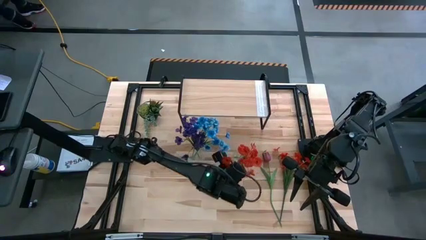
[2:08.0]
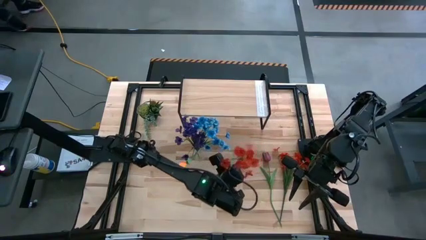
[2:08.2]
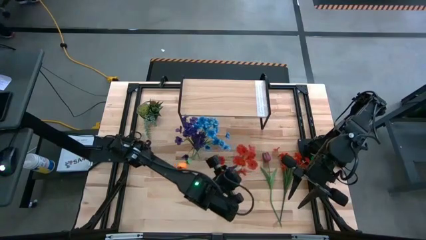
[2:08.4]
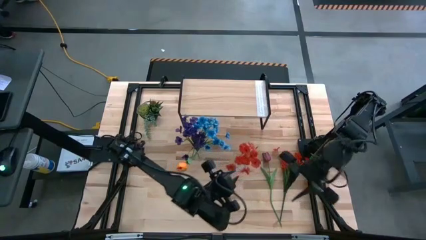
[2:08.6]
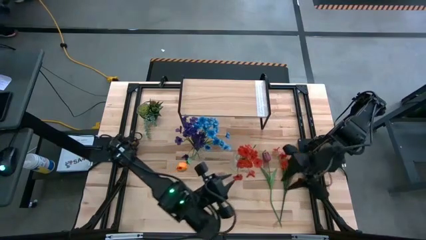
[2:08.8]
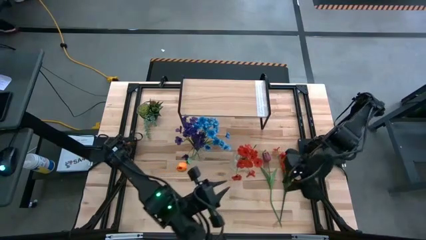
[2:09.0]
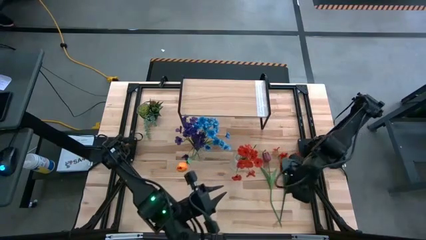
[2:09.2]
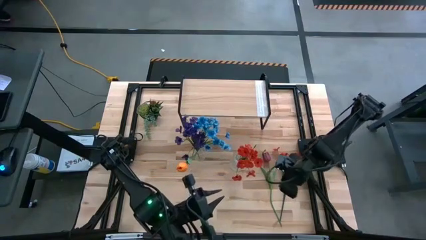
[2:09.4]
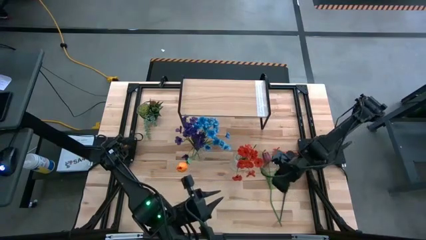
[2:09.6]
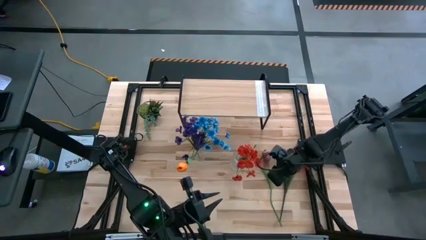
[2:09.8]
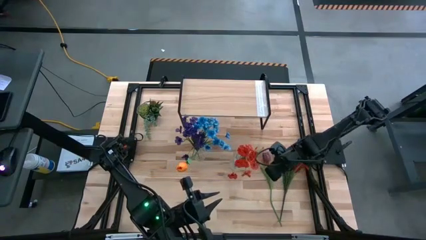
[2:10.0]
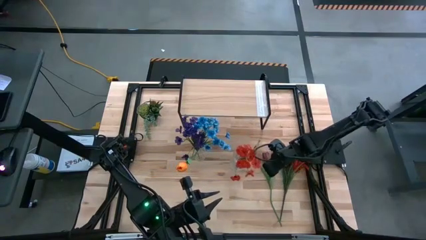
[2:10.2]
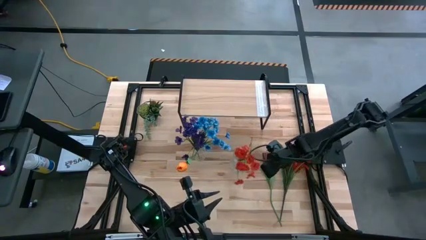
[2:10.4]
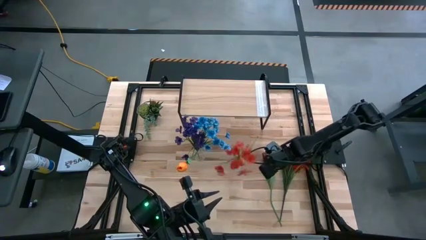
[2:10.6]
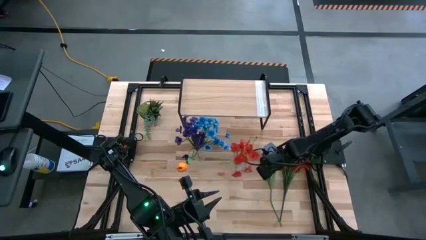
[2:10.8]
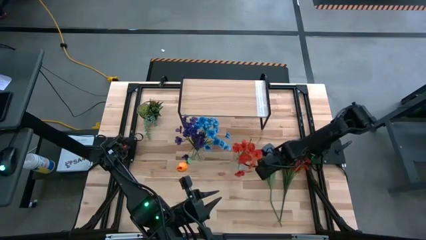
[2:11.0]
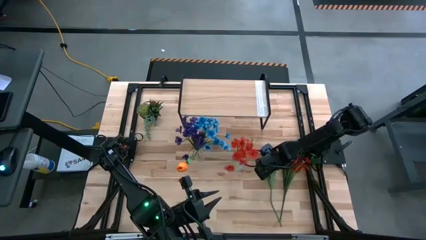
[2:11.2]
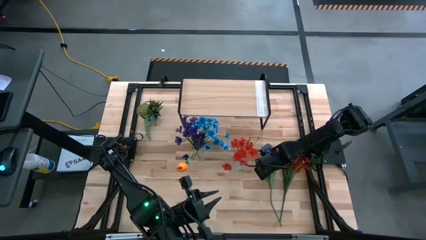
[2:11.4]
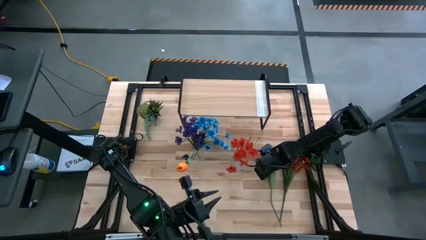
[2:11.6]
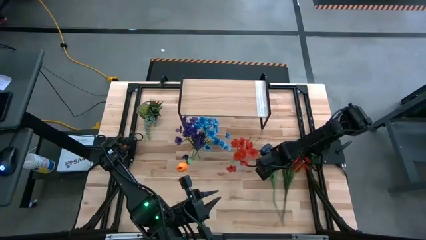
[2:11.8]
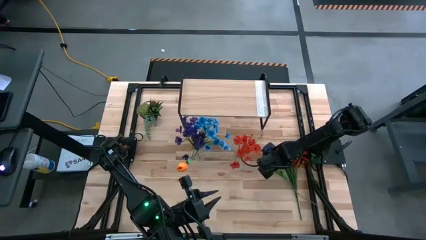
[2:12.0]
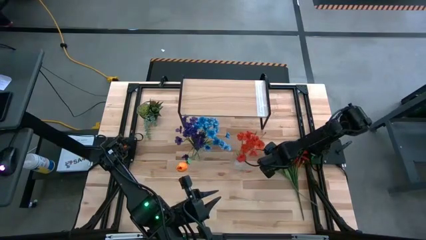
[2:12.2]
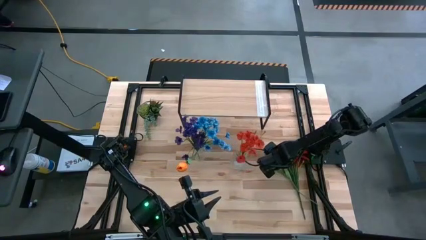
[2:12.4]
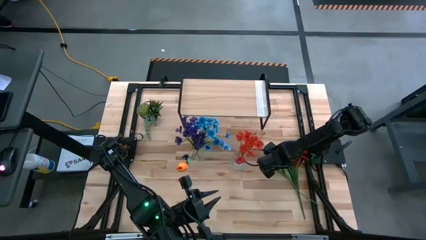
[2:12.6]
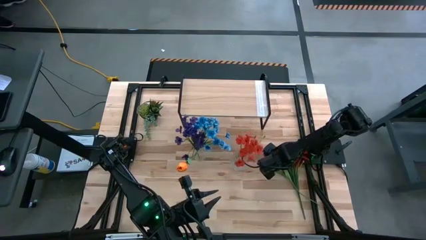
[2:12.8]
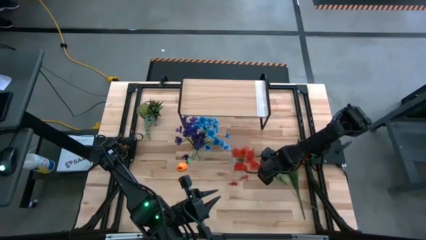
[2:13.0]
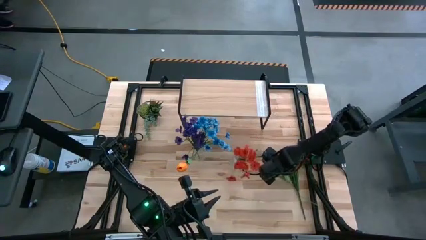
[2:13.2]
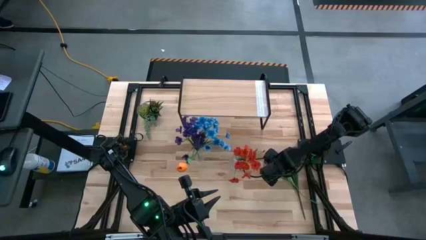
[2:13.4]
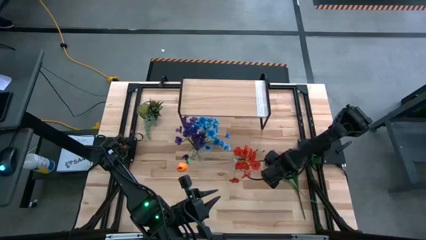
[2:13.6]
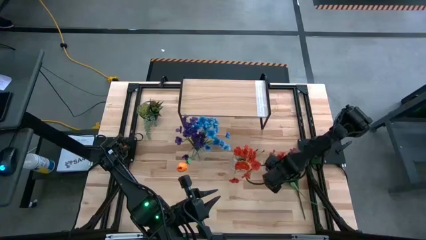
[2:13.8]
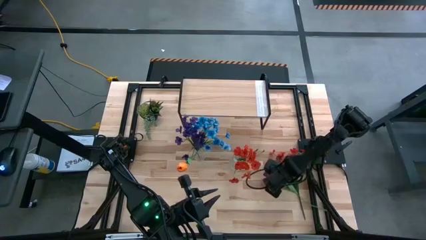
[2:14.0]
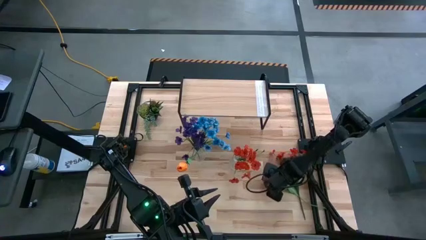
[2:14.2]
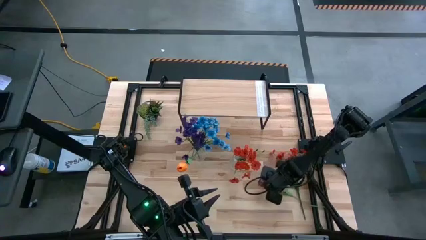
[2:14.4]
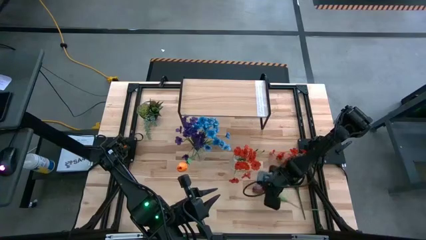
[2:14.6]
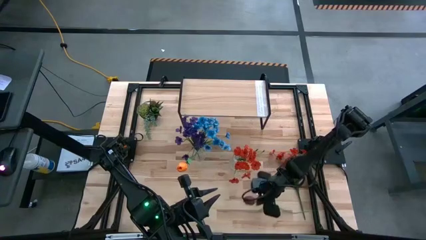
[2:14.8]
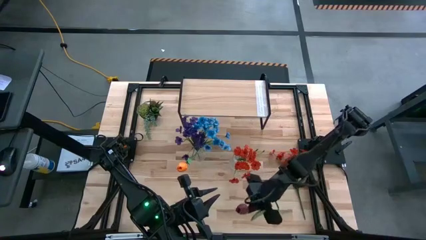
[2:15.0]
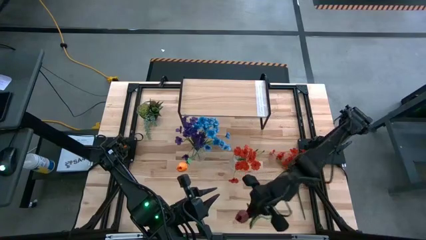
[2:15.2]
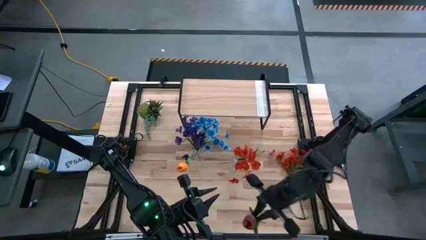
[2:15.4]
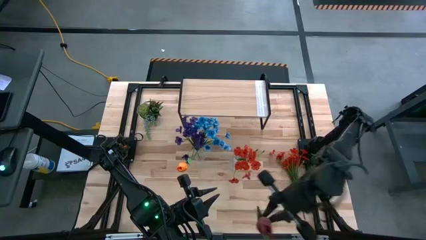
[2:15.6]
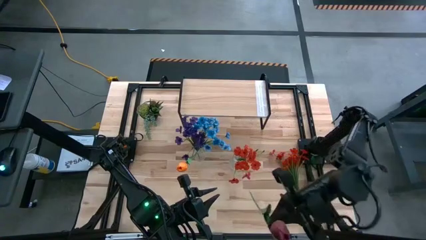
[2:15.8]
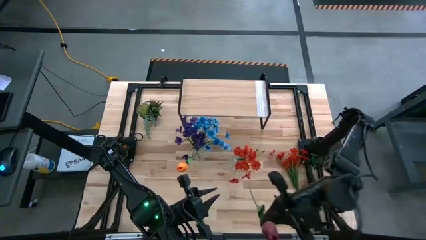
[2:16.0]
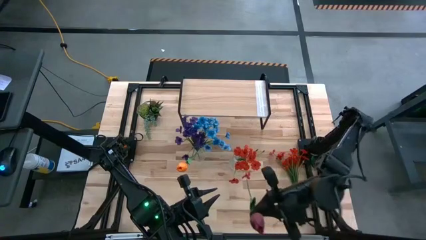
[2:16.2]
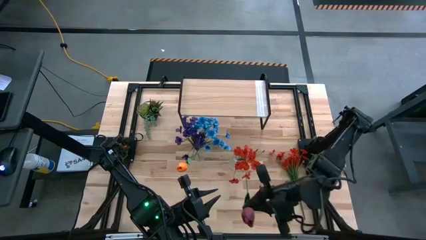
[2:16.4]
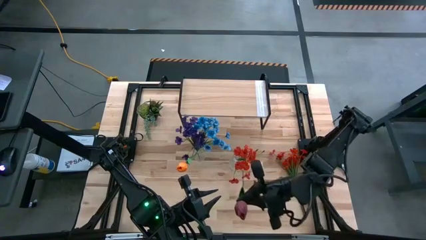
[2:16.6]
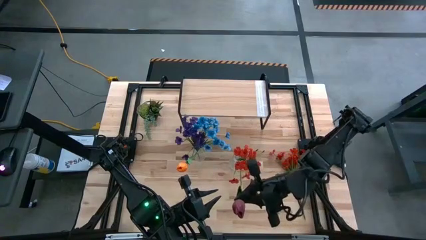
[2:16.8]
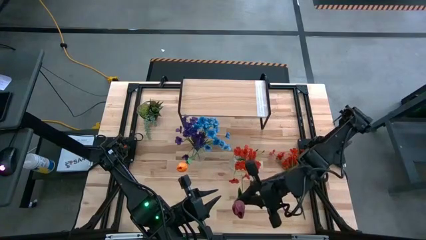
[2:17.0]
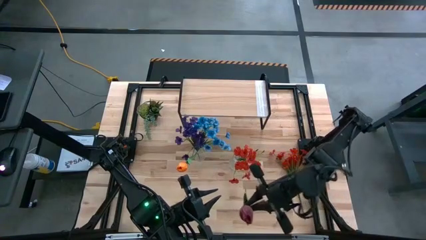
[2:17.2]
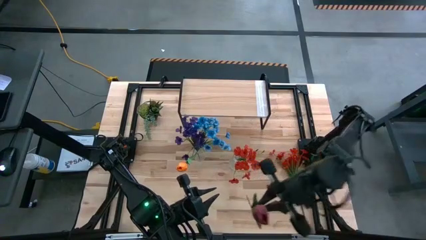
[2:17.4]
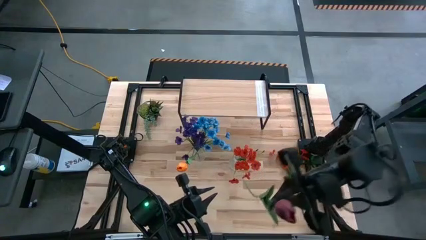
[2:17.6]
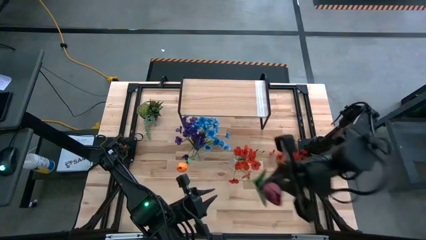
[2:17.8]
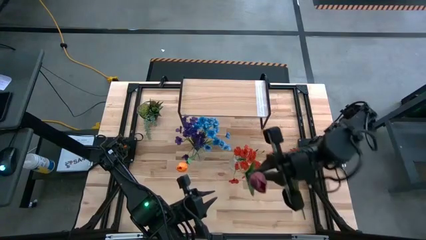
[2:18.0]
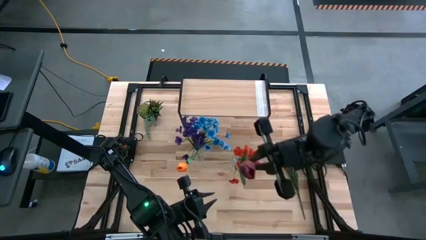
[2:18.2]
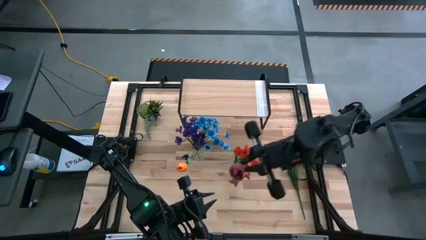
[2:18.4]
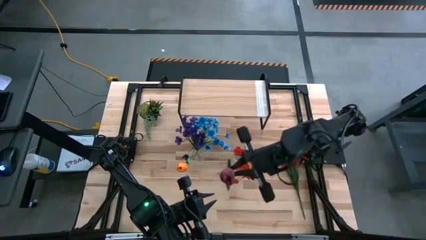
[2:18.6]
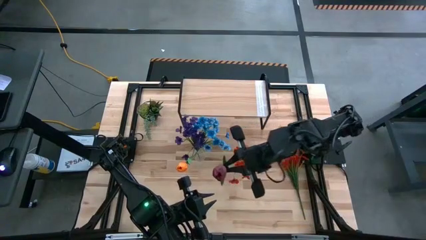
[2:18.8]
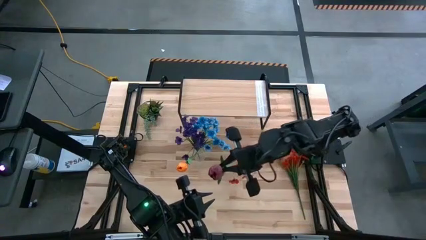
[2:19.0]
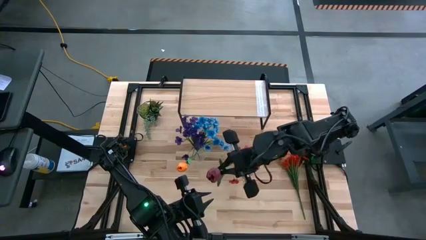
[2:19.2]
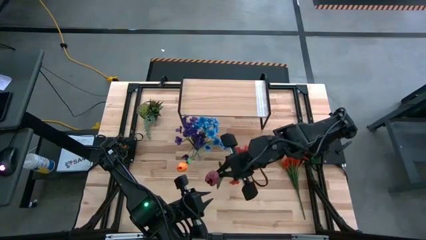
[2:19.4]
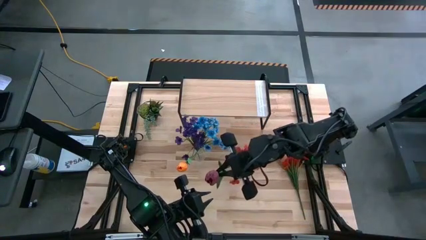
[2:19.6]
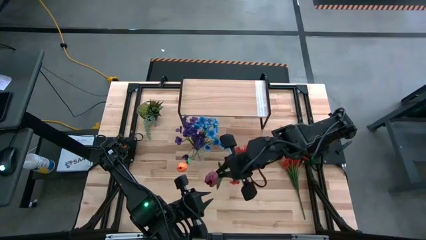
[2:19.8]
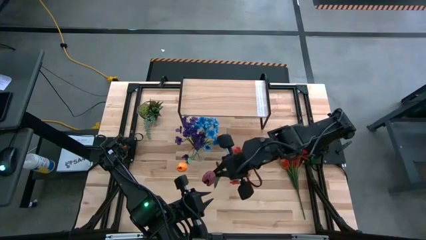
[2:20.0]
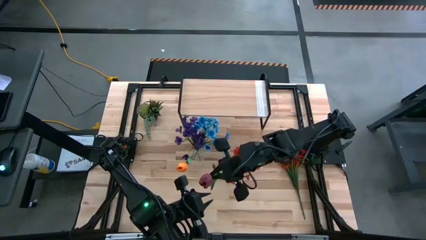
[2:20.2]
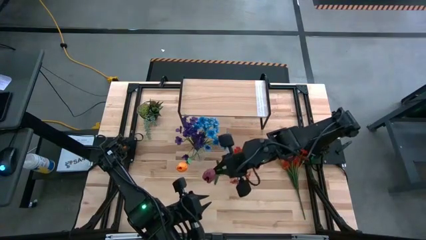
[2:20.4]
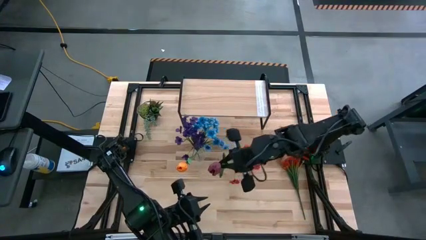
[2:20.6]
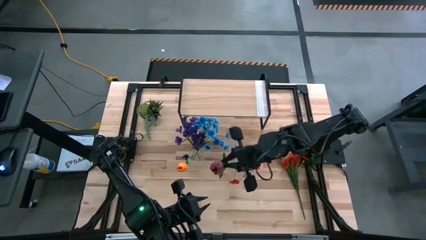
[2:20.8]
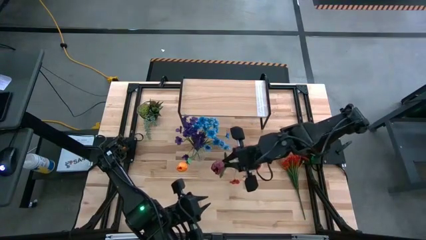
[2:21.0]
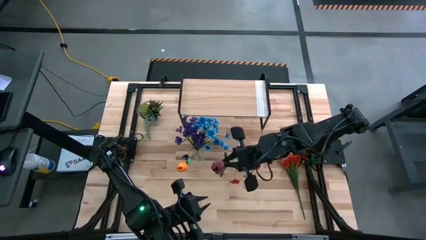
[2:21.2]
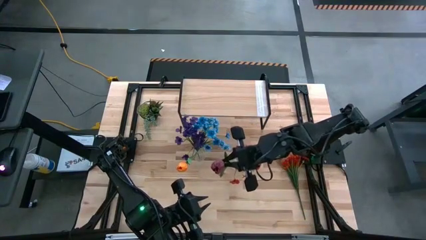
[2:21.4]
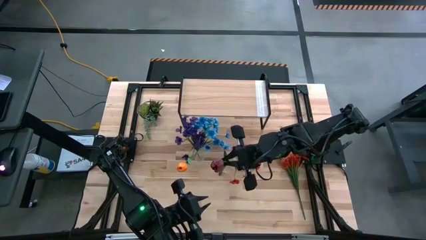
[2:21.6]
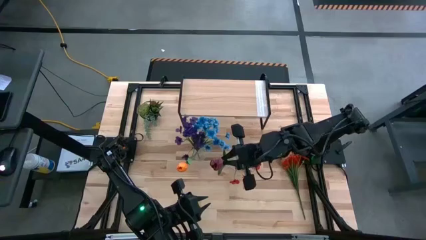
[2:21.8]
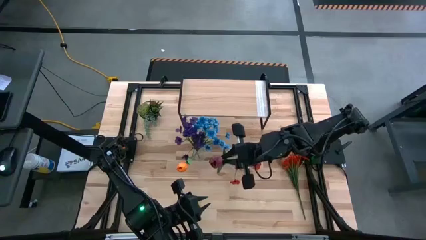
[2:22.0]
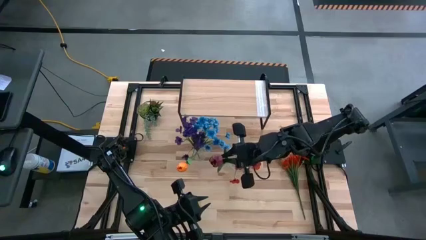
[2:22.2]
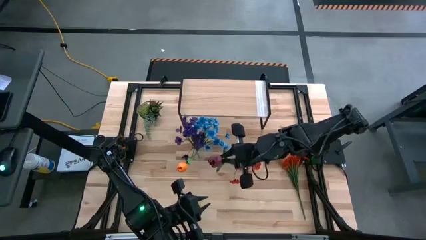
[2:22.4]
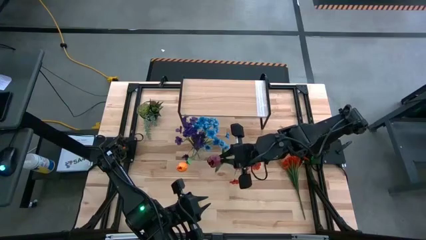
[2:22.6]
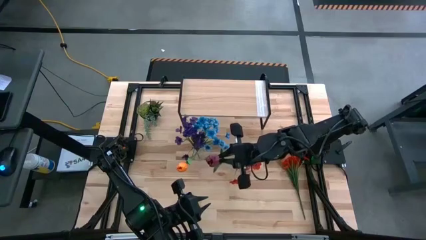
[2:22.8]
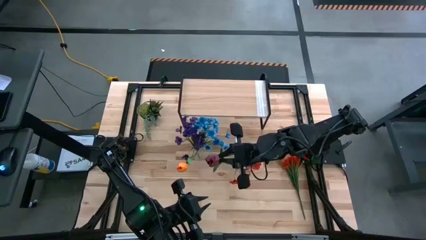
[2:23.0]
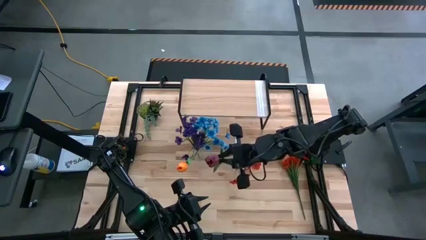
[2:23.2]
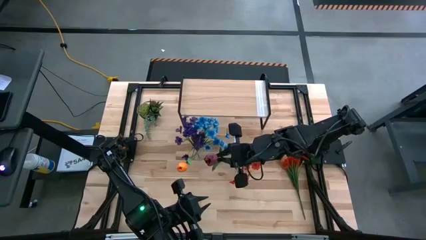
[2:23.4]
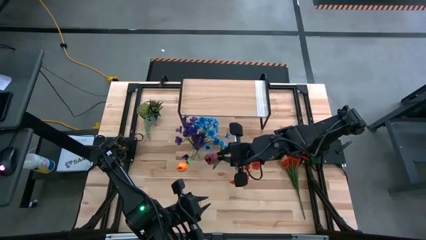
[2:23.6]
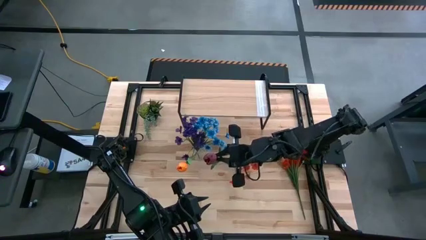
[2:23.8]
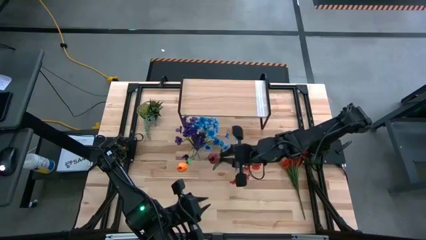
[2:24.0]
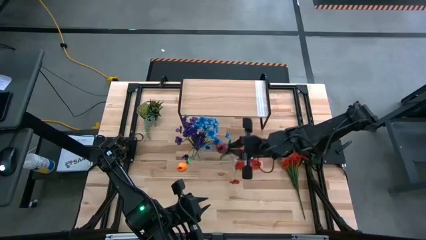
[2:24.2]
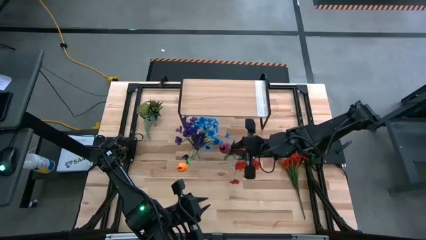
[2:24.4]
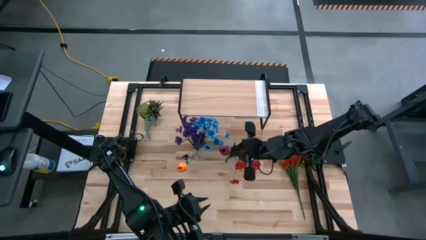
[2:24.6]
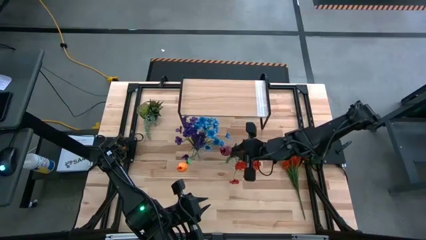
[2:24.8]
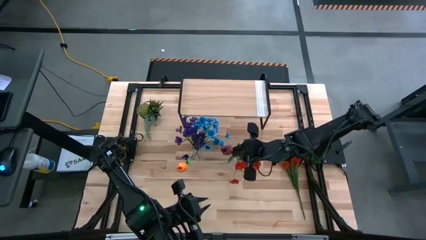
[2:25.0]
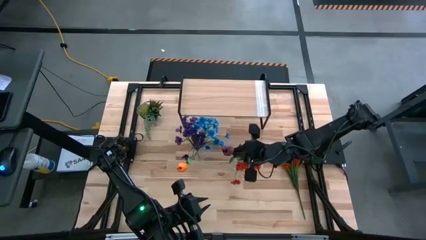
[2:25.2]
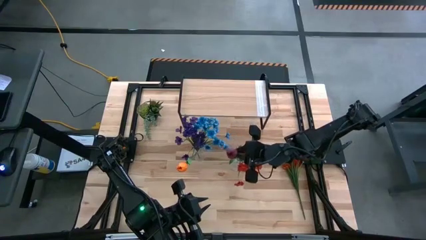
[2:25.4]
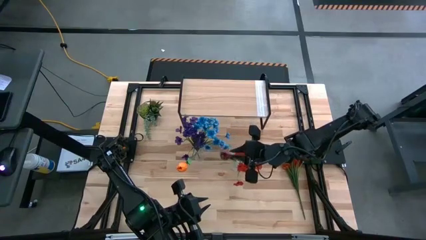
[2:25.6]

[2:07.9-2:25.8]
Task: Pick and place flowers into a vace then onto a shelf
Put the dark red flower into the right transparent crystal vase
